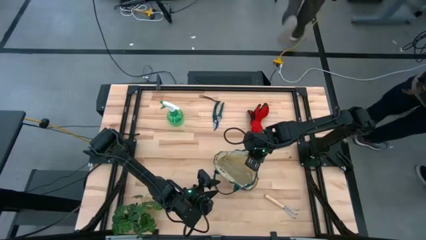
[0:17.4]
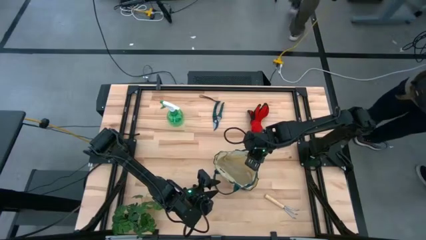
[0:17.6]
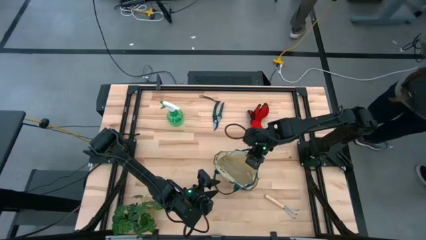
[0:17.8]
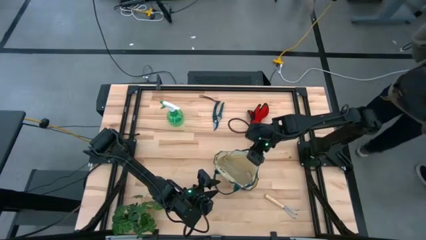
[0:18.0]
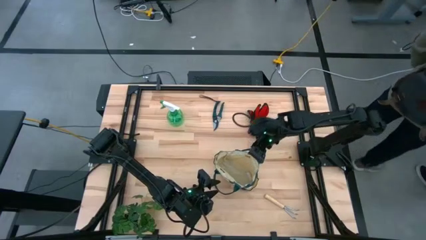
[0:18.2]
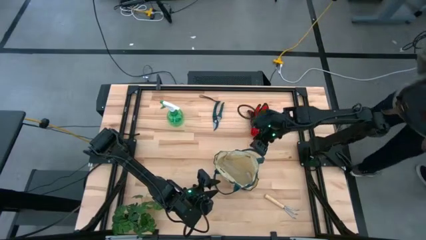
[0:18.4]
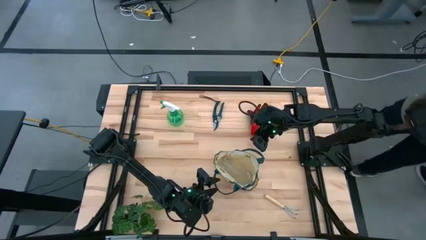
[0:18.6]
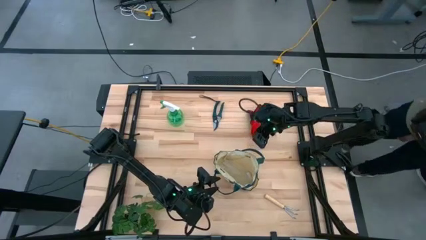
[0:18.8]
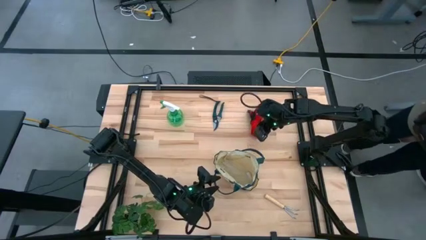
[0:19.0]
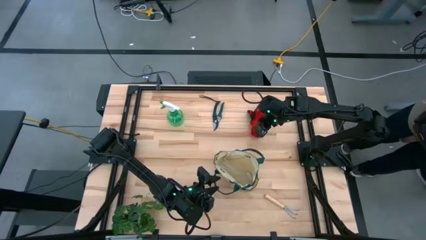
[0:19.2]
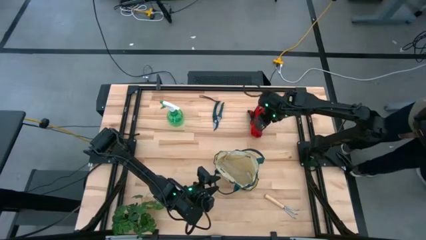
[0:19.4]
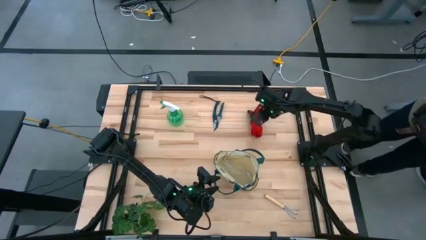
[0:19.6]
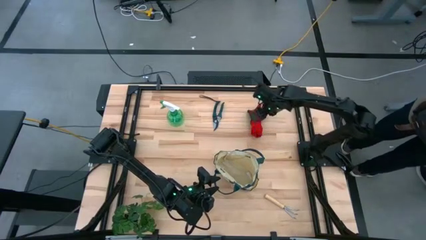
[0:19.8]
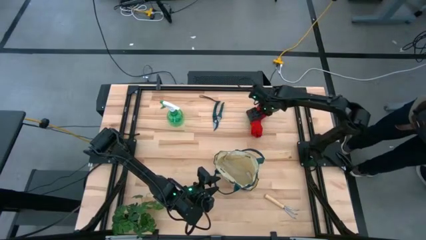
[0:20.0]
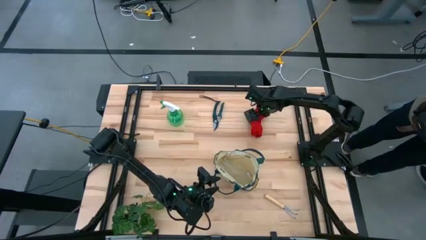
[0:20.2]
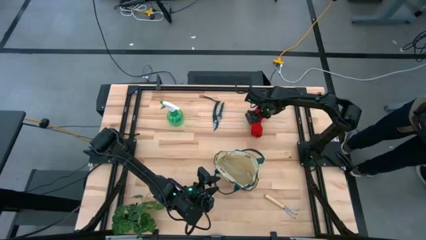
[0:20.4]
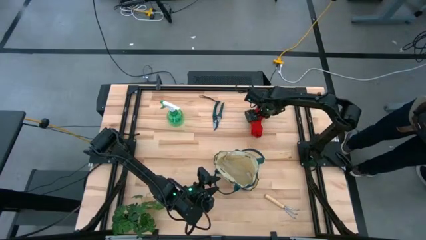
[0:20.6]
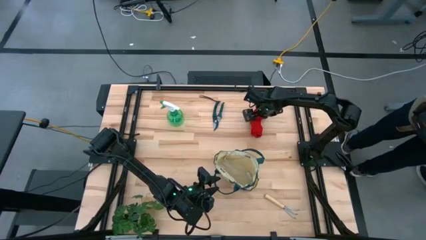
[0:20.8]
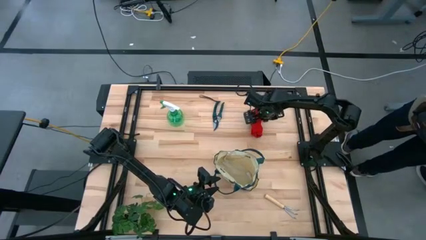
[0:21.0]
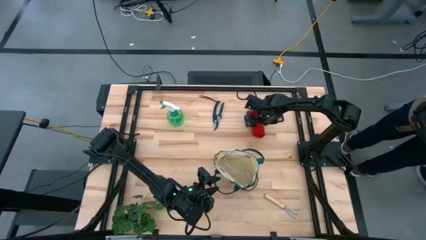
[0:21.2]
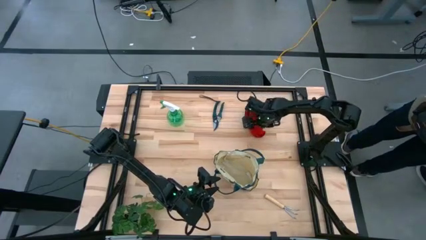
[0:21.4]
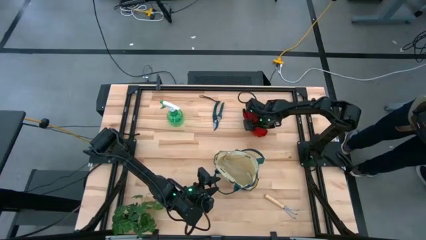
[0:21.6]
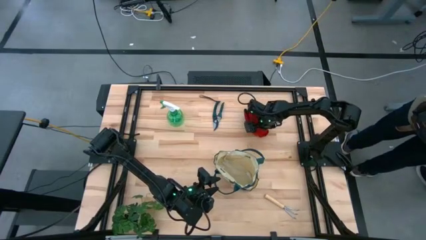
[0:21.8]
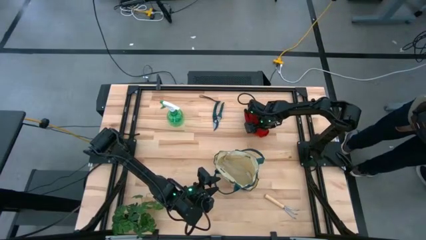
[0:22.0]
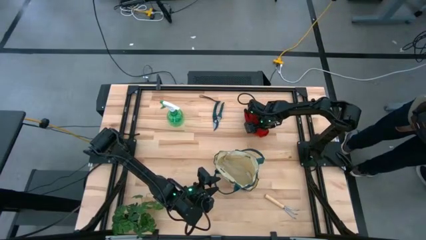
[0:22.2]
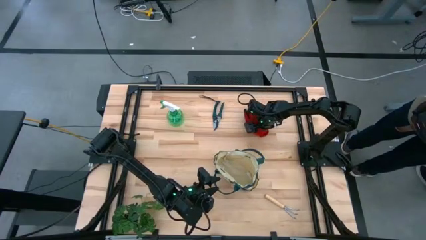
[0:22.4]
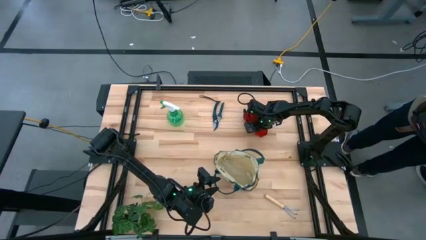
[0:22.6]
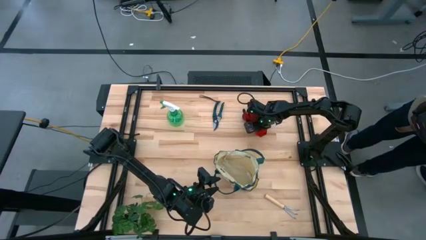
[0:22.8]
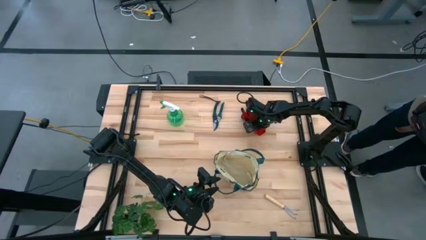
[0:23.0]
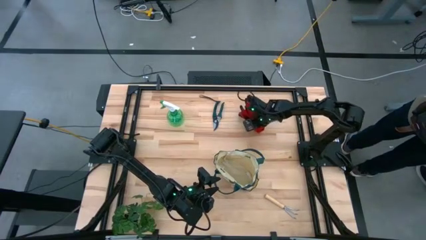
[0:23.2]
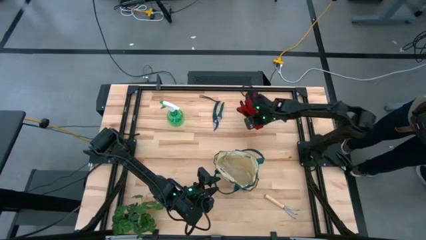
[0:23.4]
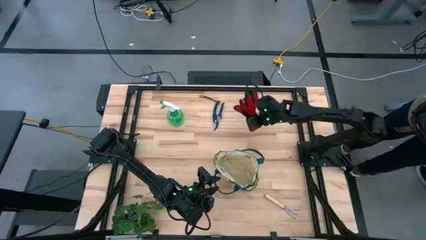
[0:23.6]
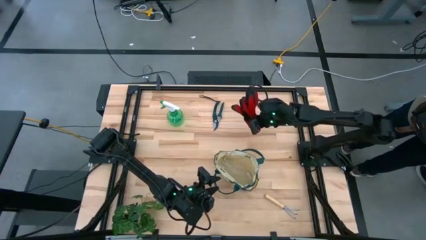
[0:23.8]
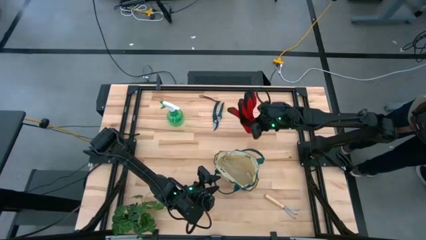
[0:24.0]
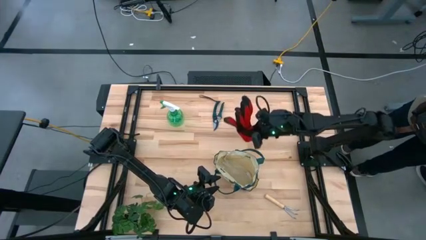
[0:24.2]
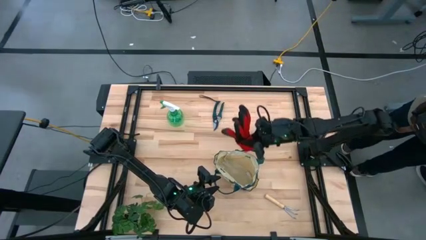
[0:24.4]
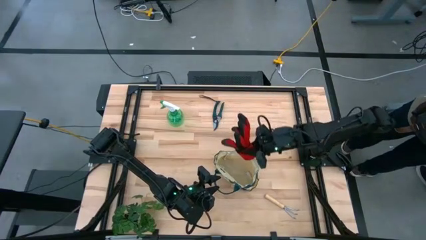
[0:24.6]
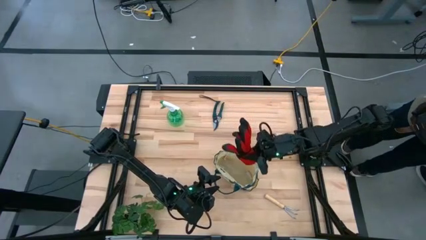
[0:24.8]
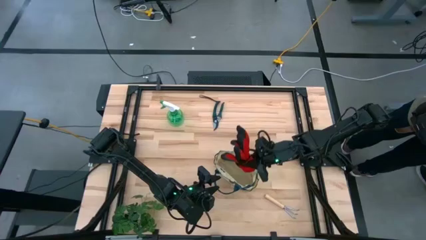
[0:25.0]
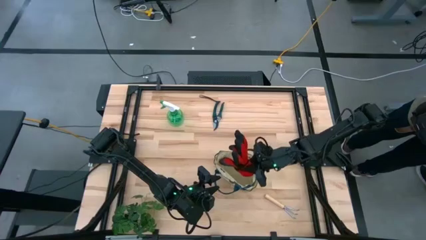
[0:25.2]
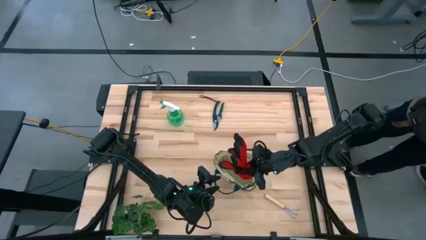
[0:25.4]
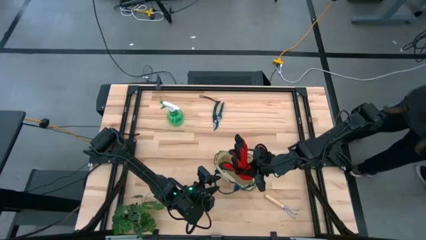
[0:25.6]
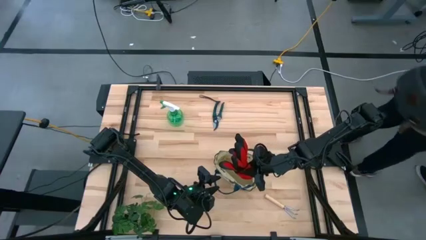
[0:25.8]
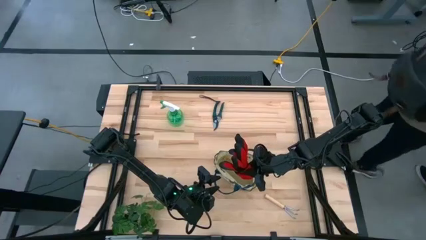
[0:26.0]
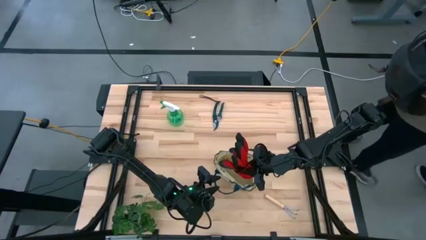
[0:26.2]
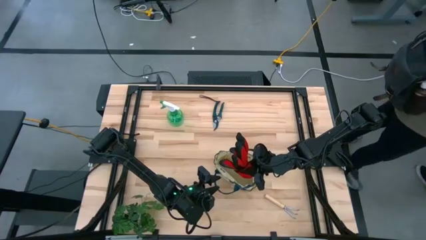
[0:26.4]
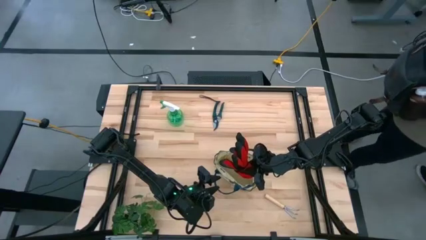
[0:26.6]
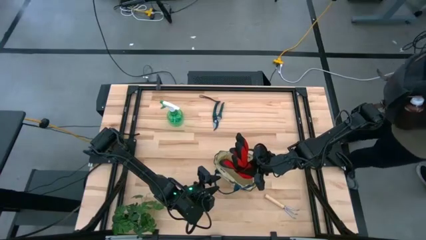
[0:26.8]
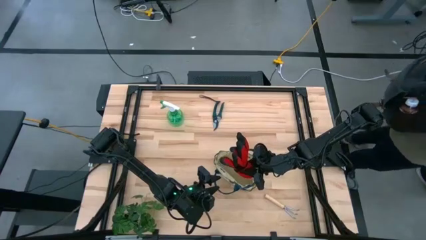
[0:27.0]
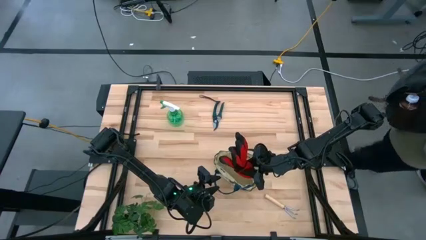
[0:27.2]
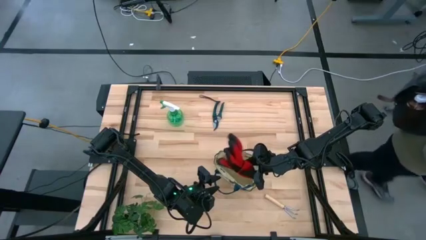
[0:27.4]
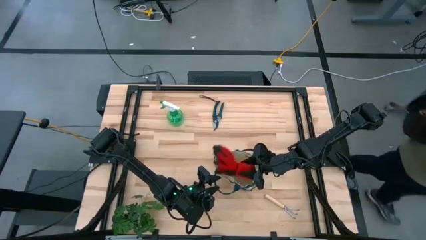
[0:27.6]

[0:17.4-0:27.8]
Task: Pick & Place Garden tools in Gardening bag
Put the red gloves into the green gardening bag
